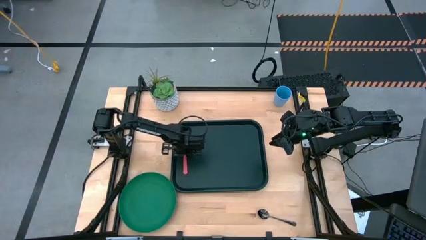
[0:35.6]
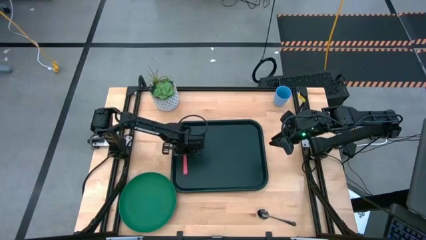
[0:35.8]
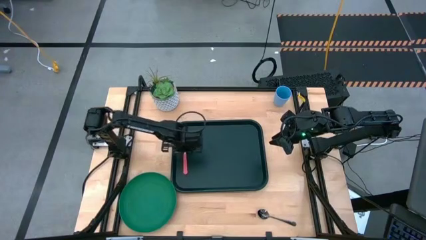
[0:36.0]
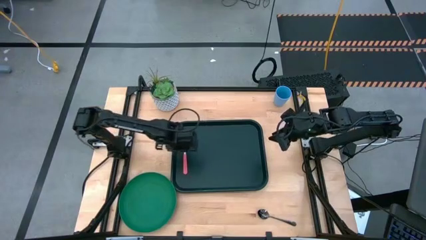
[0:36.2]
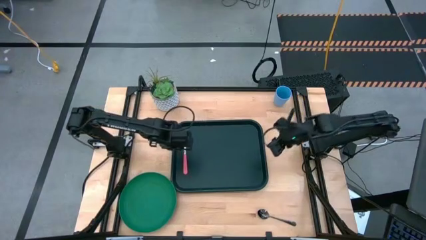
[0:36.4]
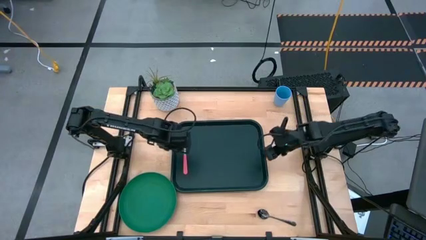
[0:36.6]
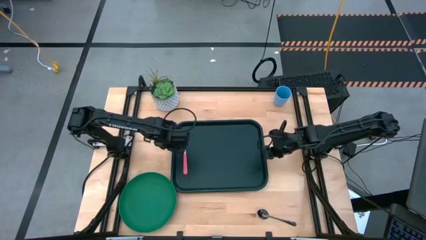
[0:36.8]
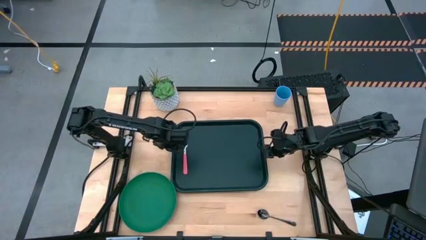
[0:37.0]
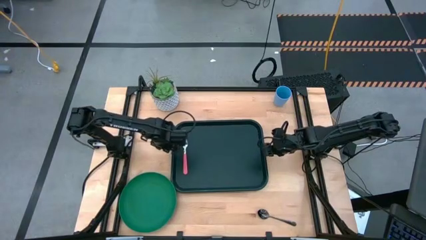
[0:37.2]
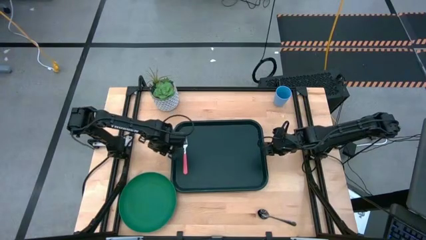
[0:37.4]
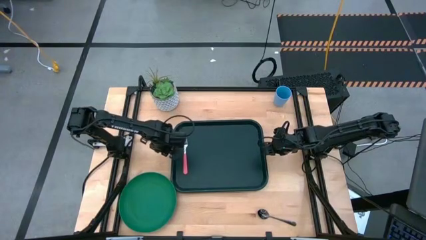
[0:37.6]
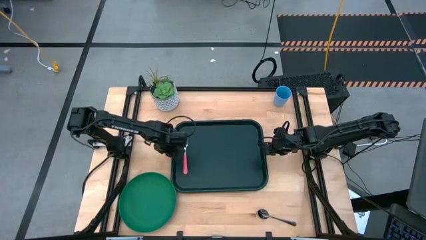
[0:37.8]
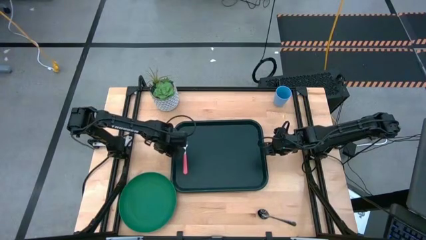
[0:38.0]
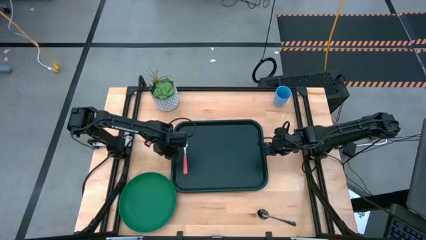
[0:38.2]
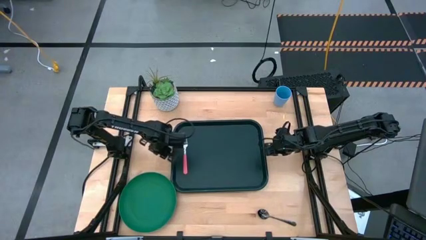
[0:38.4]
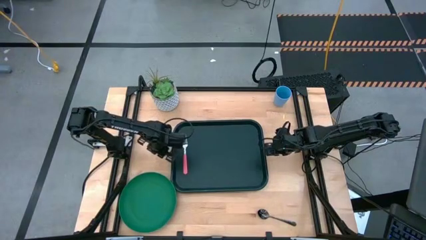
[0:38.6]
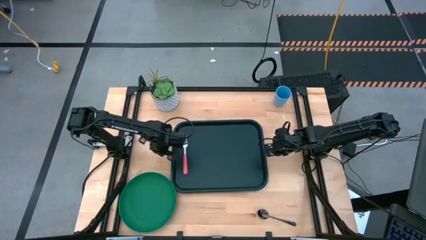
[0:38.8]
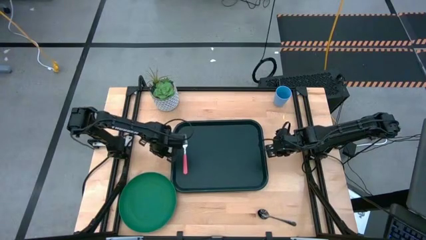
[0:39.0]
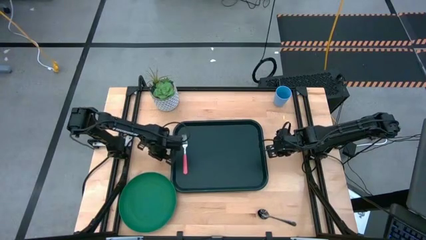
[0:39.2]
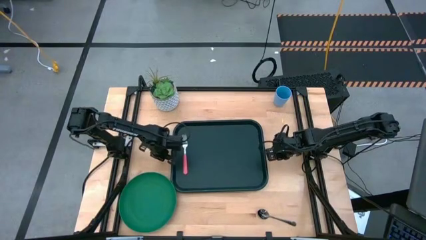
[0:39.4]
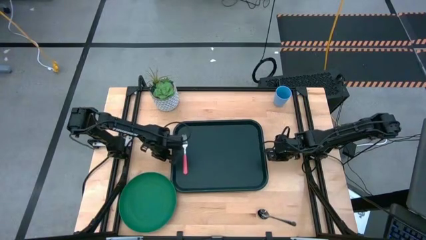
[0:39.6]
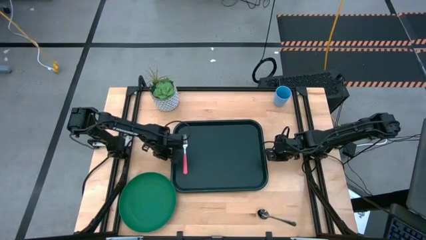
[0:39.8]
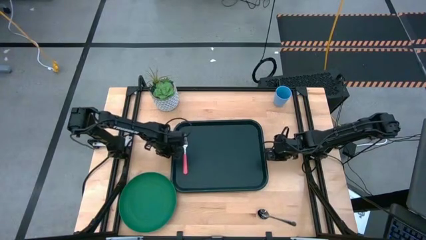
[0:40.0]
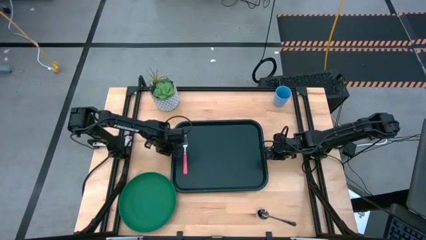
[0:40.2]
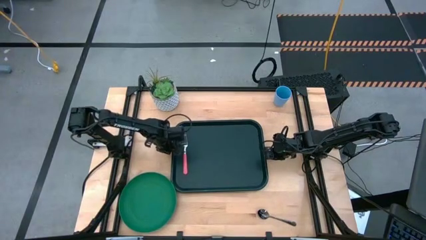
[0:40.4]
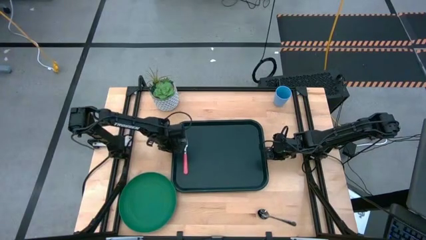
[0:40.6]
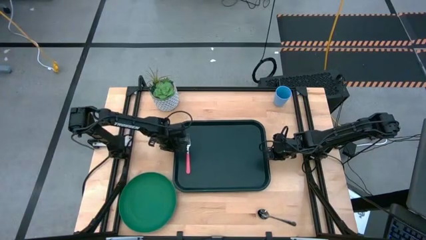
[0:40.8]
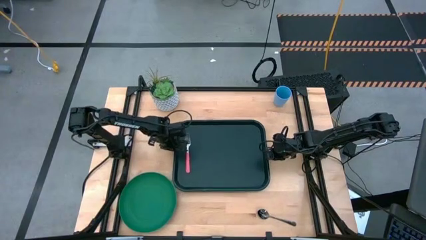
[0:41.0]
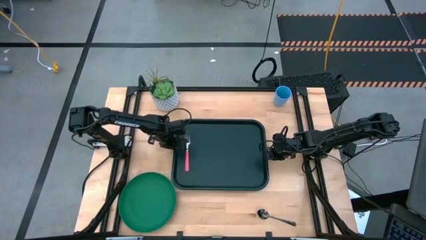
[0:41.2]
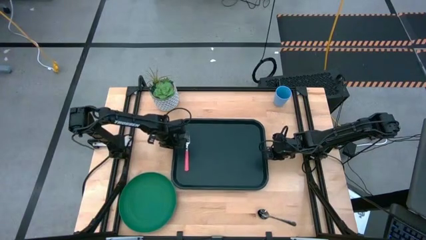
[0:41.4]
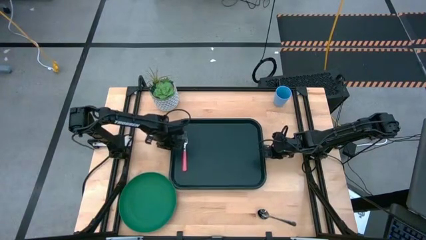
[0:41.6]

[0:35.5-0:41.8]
Task: Pick and place plate/cup/fork/spoon on tray
Adjust the dark green serving tray

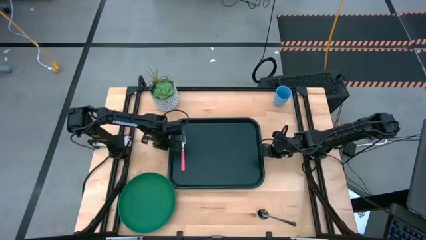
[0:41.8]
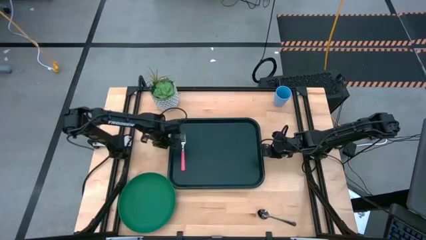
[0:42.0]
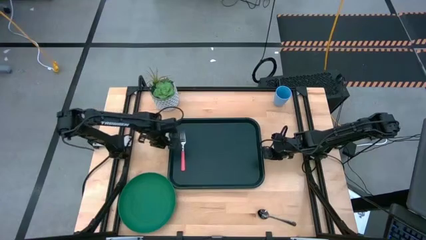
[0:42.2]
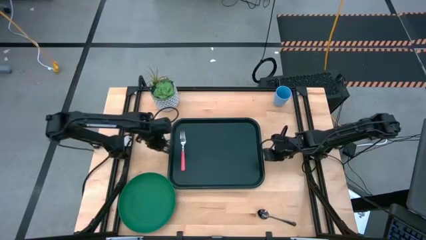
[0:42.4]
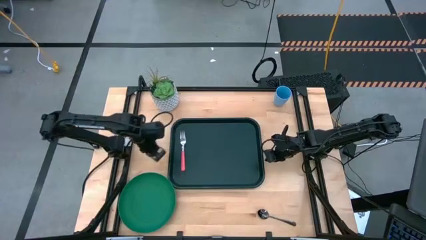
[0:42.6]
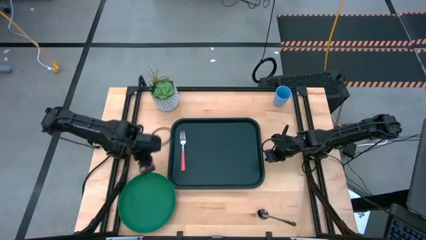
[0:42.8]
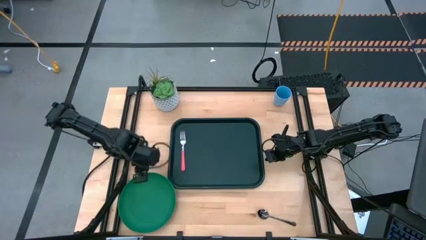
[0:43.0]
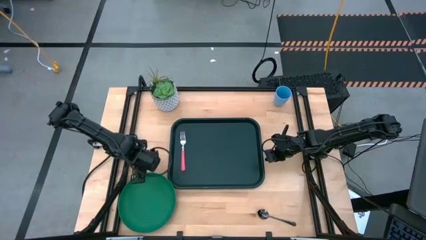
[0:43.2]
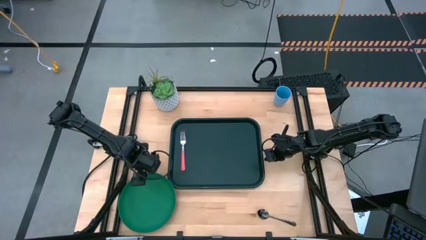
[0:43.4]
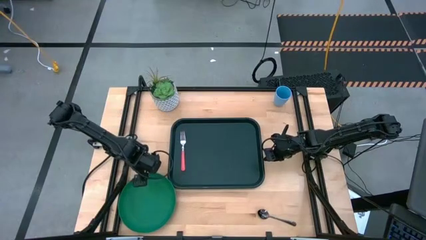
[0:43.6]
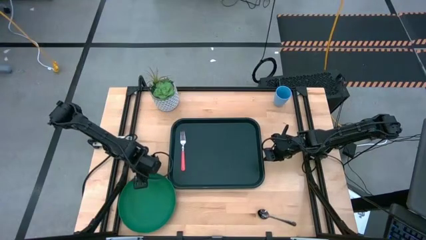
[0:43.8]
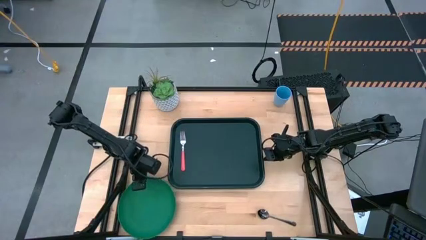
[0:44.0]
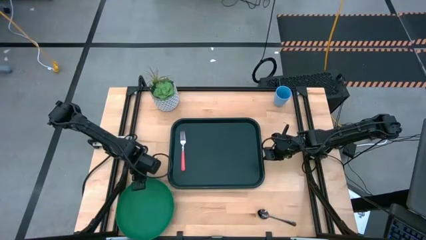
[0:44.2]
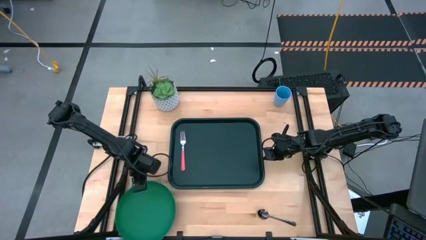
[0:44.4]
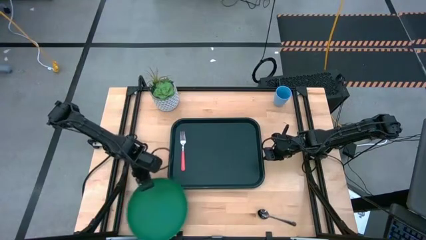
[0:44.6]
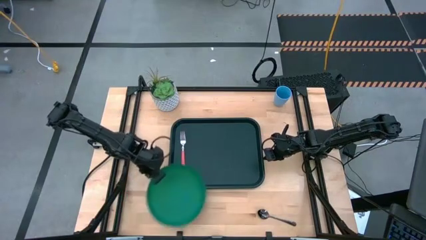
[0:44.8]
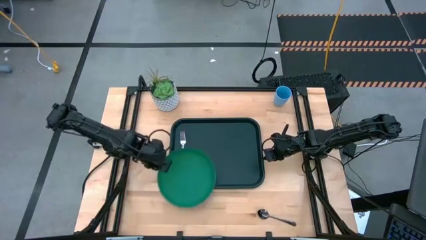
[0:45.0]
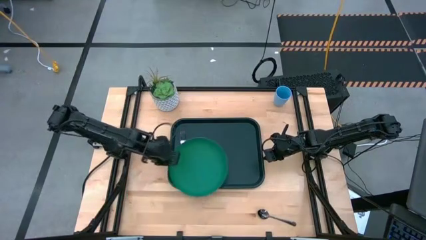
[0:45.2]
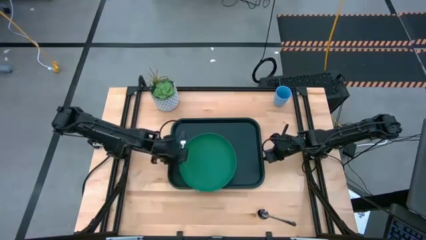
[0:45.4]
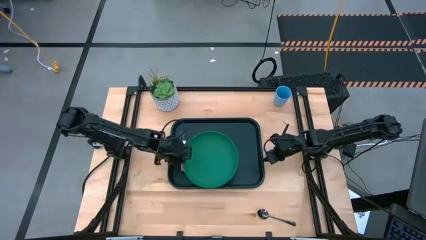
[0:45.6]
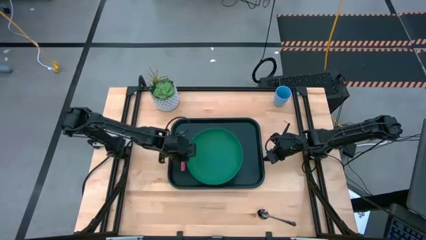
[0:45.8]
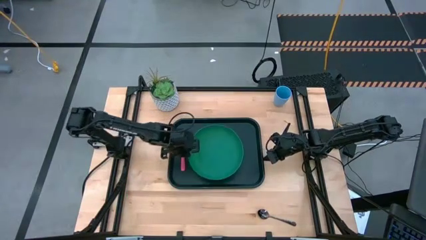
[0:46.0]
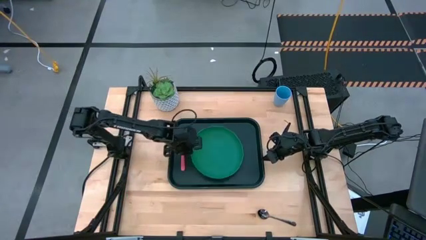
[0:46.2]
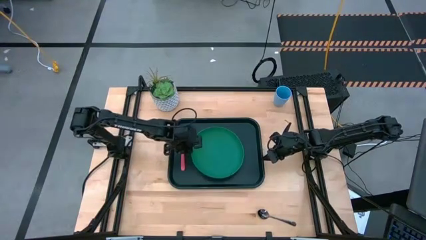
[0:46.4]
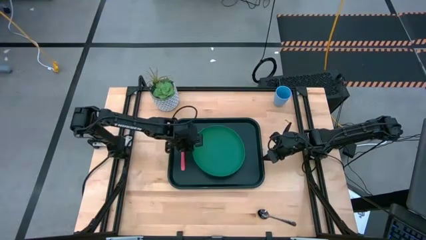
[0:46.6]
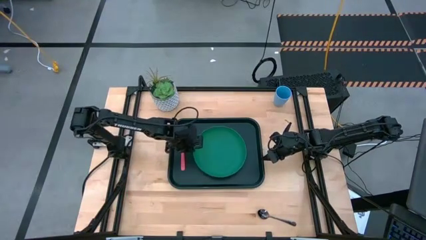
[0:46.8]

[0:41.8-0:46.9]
Put the green plate to the middle of the dark green serving tray
